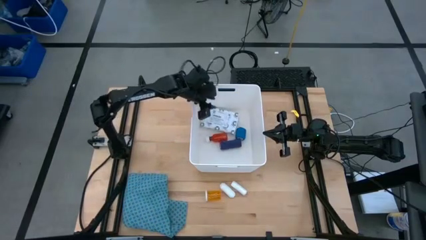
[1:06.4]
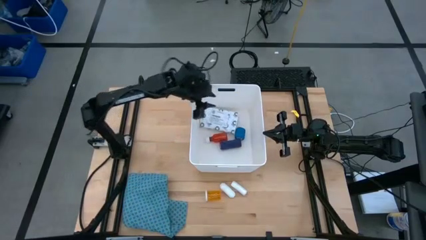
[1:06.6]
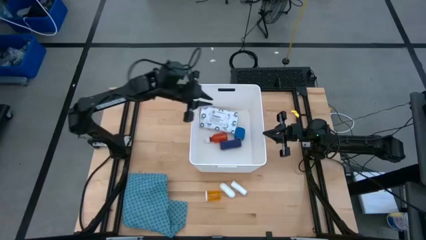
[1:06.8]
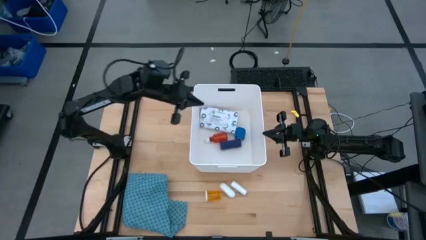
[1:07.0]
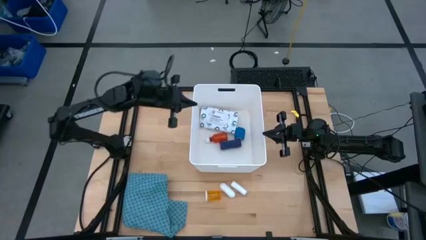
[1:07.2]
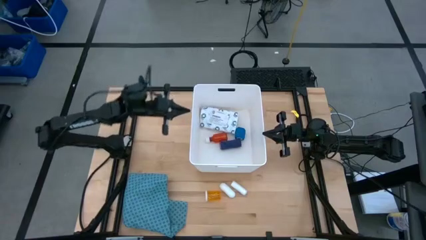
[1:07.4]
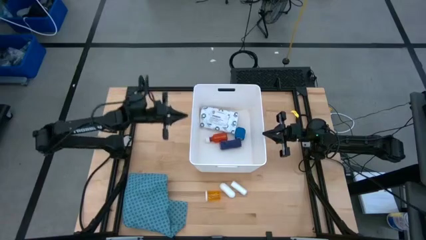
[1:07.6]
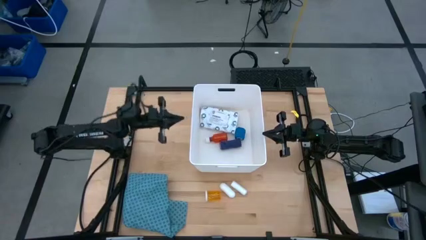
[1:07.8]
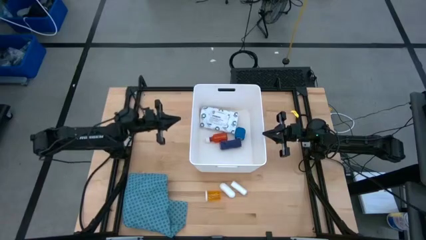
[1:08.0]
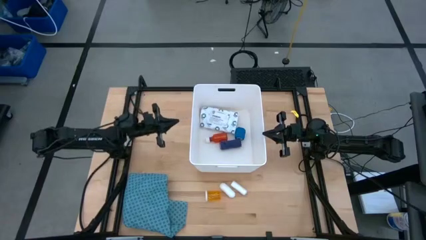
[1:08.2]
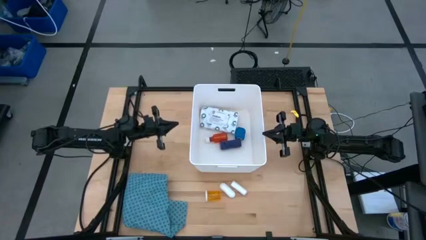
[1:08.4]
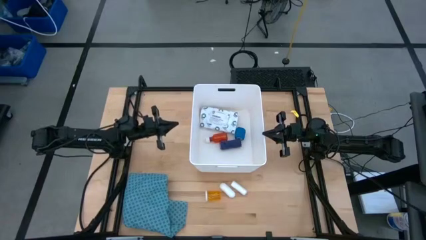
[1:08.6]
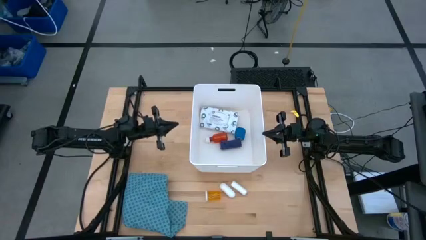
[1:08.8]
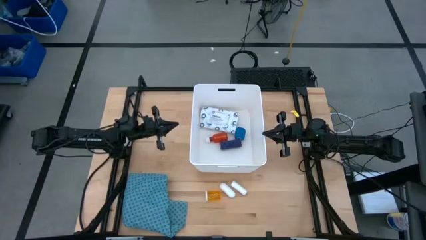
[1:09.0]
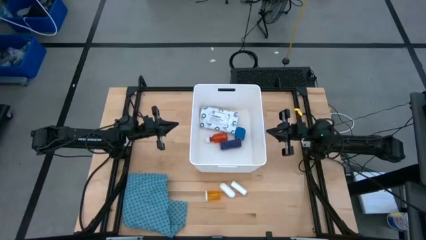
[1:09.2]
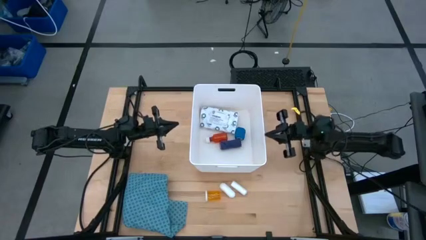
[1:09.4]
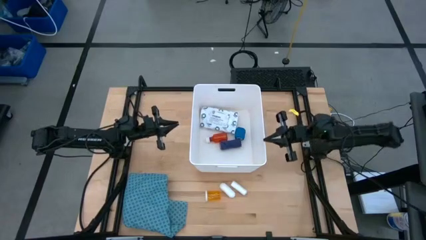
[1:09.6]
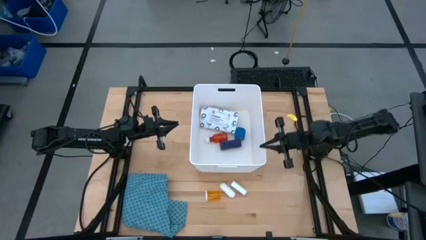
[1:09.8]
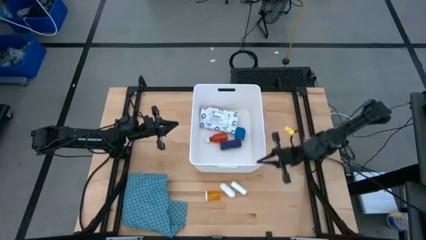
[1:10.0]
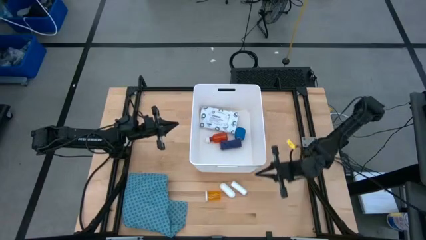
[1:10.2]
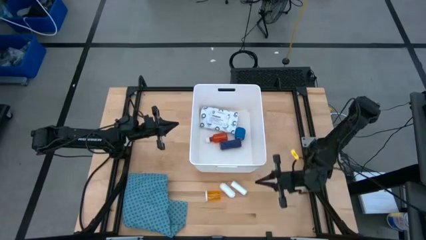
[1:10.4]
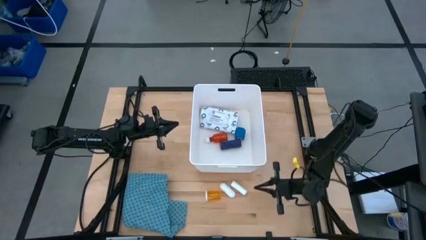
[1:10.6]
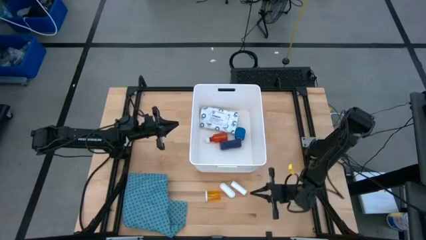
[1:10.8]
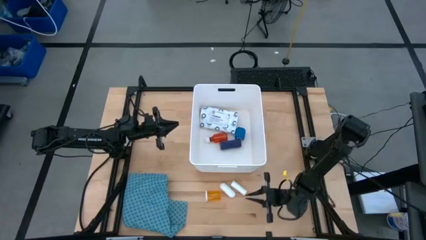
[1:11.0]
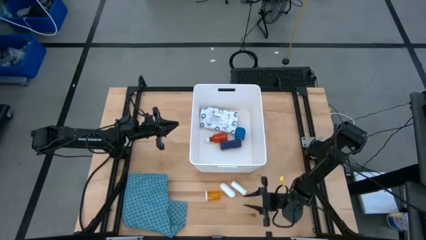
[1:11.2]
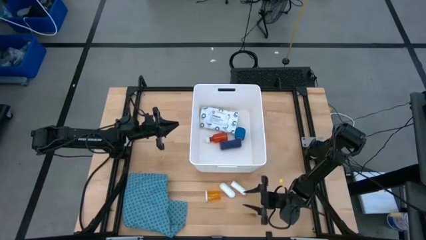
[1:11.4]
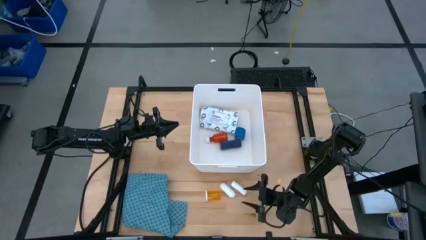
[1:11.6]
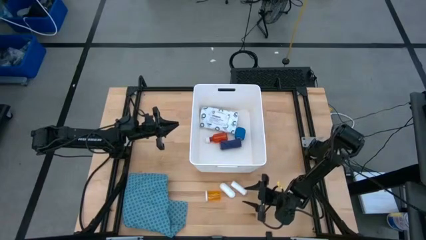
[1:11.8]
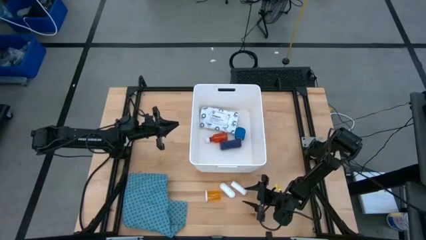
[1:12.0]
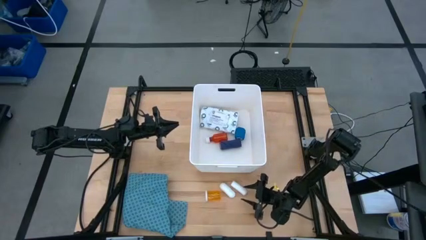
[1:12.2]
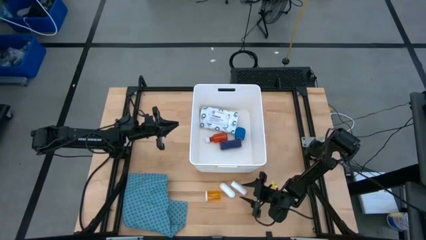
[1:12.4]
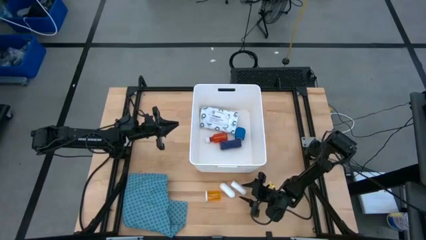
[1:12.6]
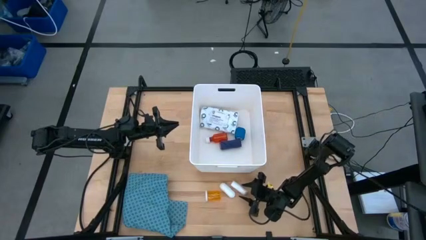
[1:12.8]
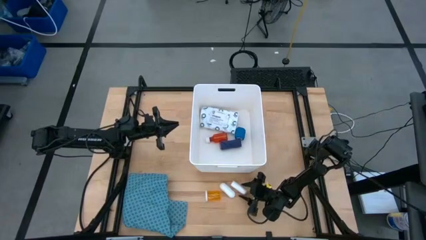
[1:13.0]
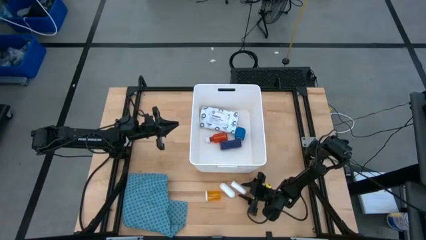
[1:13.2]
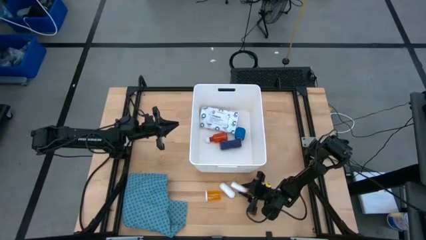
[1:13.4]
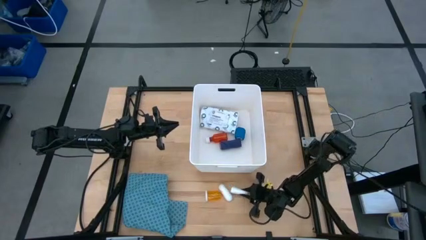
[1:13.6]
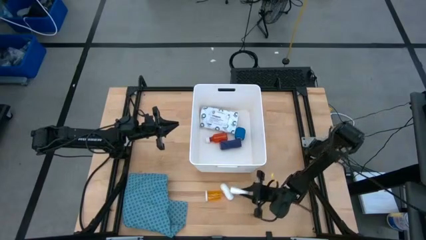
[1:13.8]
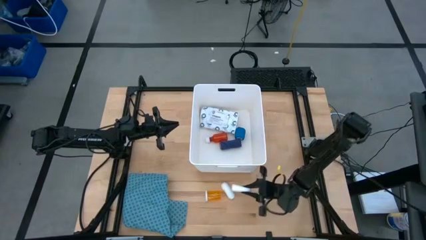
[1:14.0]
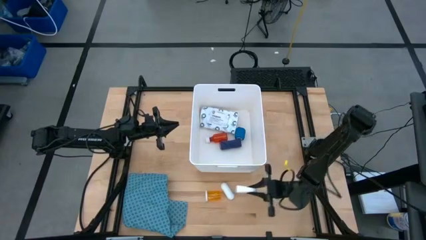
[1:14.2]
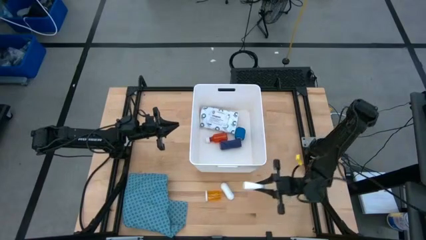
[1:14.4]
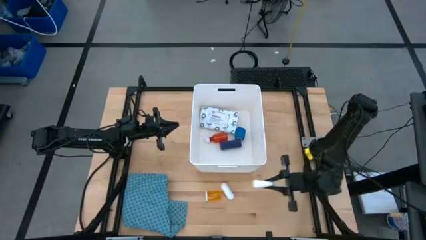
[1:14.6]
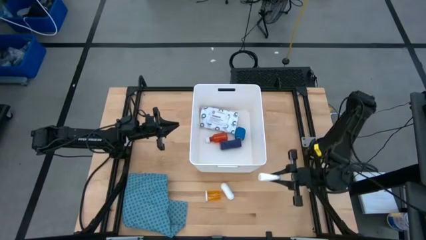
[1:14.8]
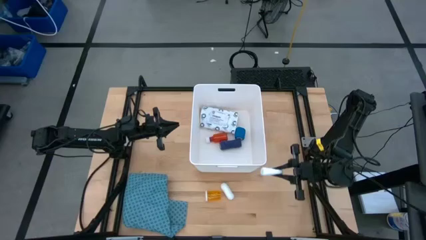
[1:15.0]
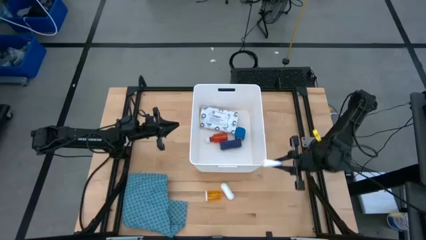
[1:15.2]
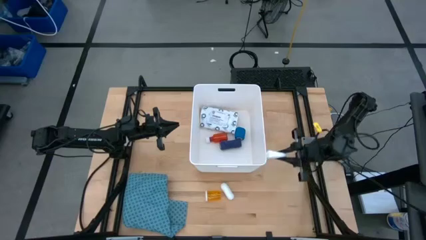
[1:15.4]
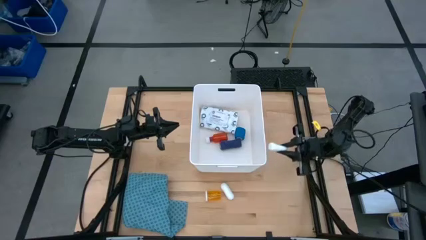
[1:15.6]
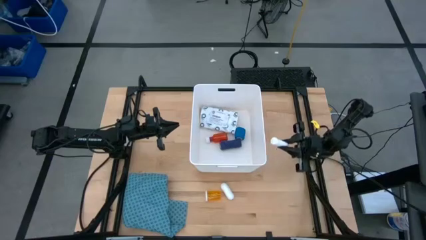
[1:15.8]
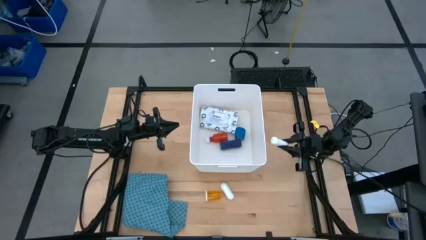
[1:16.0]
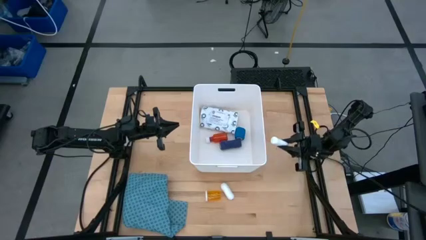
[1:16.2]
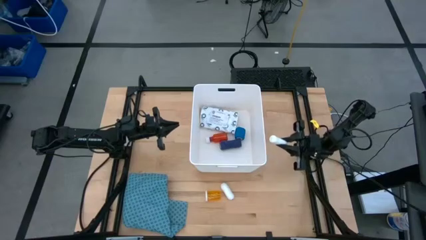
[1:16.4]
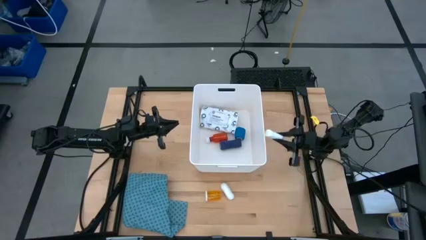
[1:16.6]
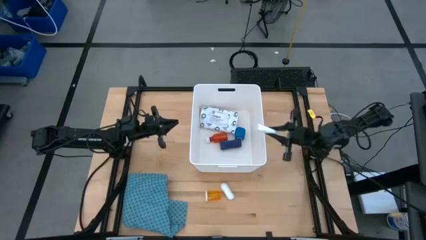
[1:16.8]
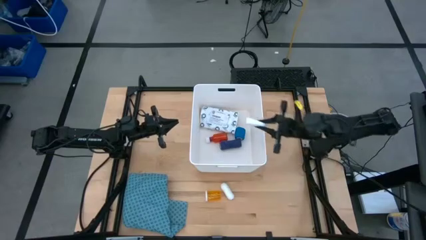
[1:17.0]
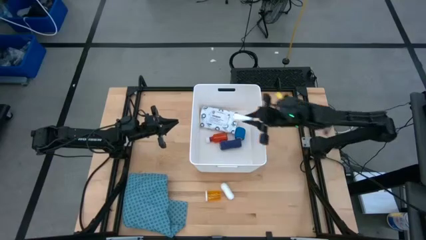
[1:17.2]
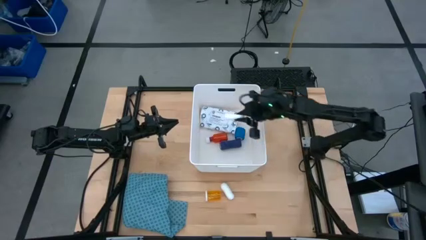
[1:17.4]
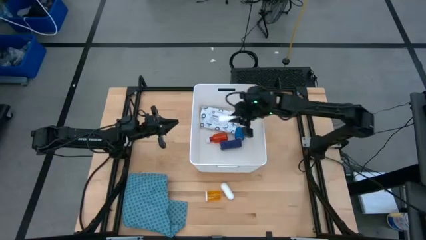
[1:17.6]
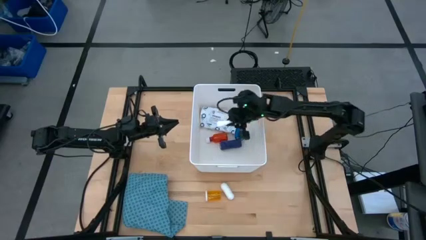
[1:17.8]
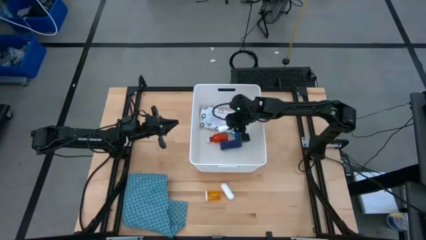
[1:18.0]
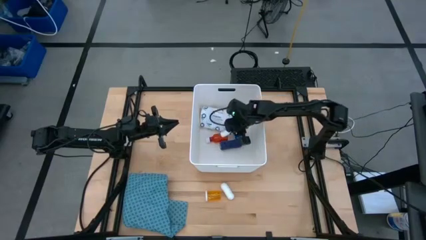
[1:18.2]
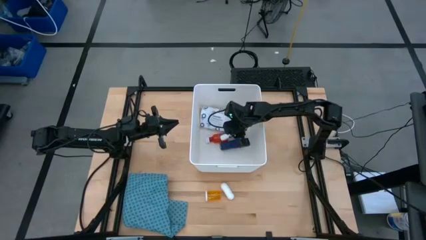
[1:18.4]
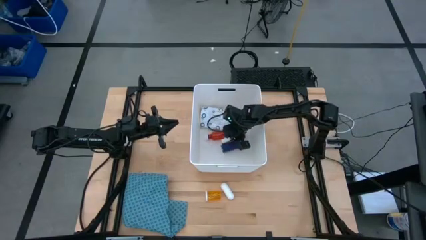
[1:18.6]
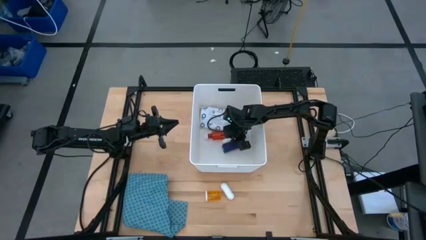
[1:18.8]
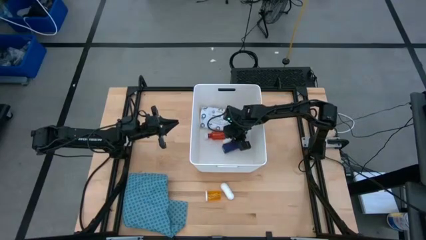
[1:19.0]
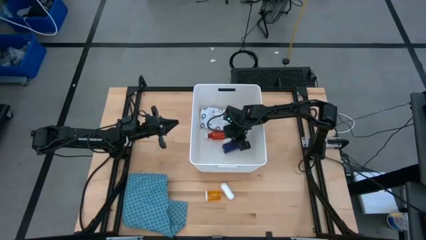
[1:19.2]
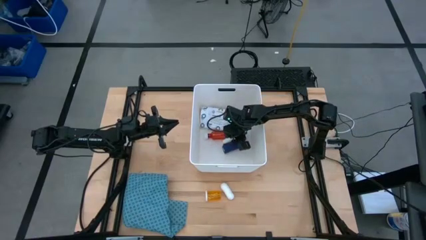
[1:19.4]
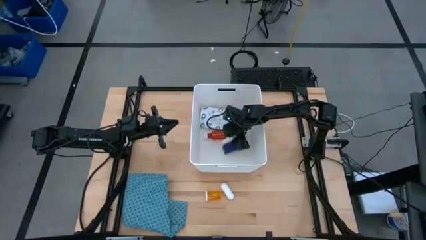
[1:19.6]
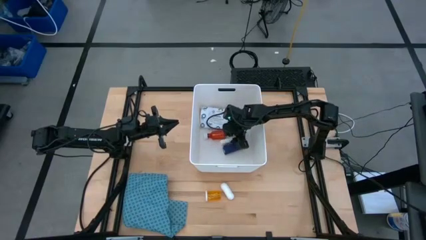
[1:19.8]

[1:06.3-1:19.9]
Task: Pick & place medical supplies in basket/bin
Put the left white rolled gauze into the white bin

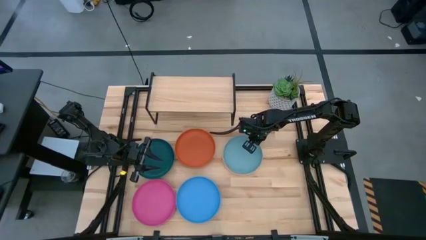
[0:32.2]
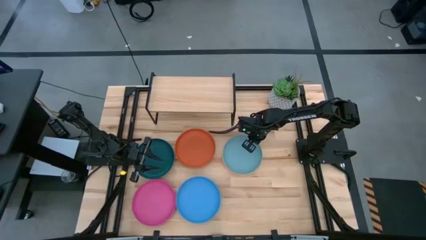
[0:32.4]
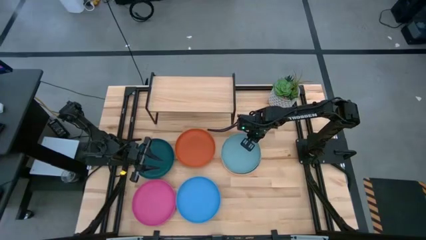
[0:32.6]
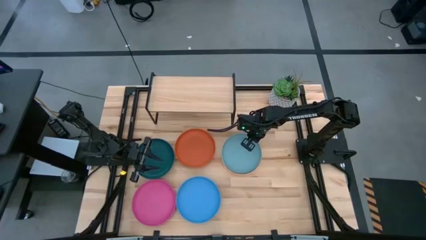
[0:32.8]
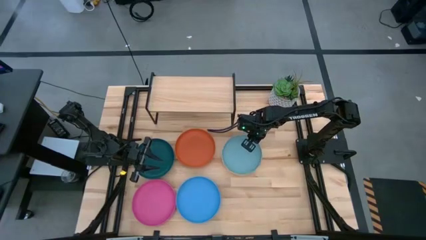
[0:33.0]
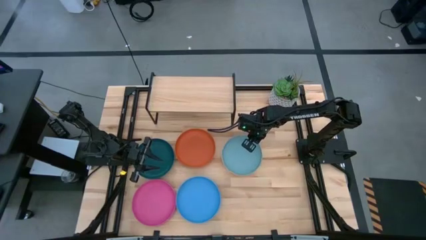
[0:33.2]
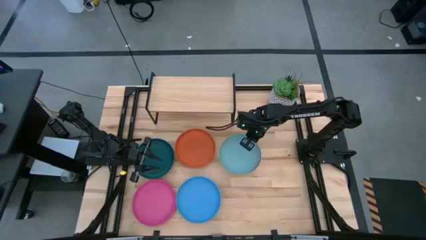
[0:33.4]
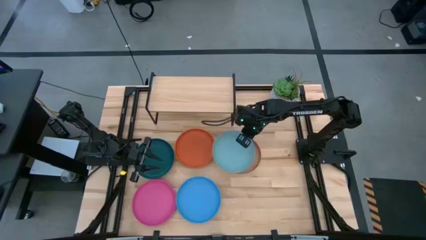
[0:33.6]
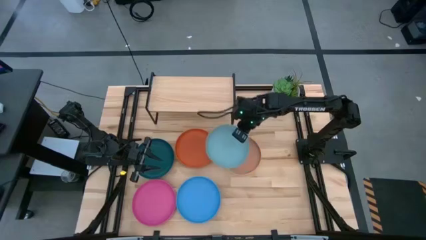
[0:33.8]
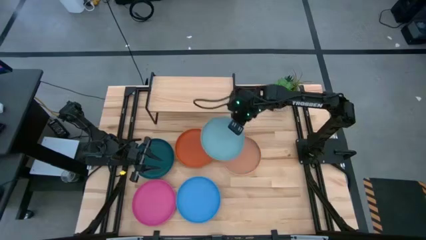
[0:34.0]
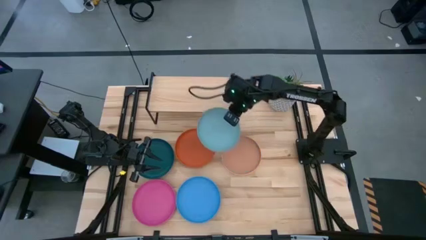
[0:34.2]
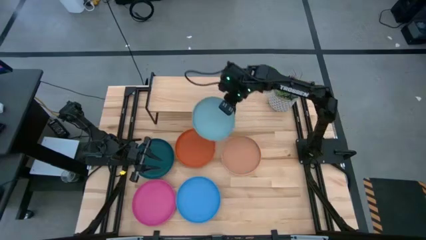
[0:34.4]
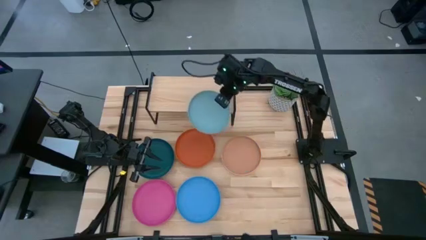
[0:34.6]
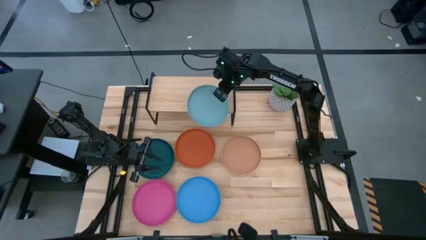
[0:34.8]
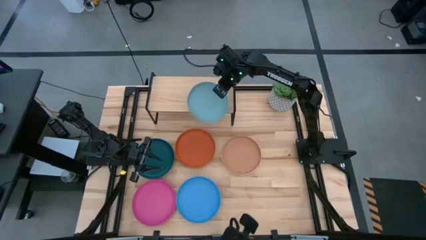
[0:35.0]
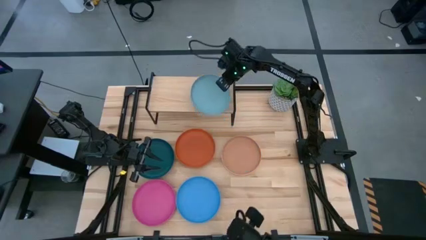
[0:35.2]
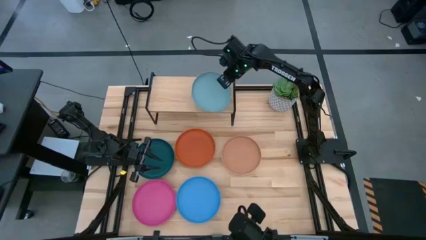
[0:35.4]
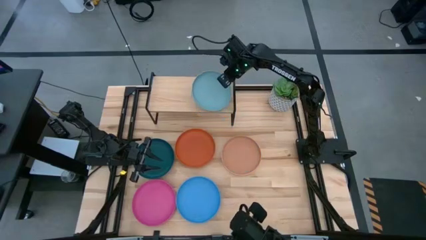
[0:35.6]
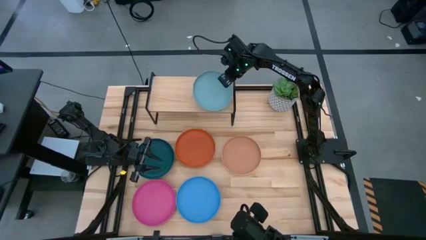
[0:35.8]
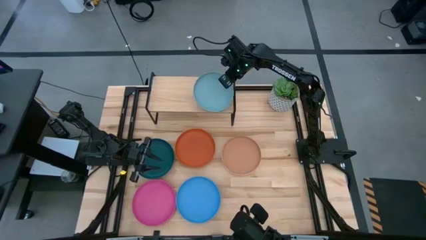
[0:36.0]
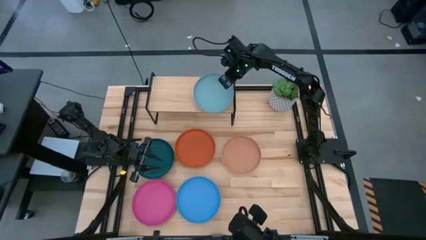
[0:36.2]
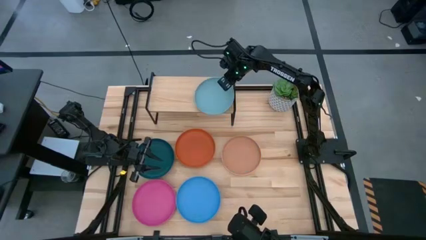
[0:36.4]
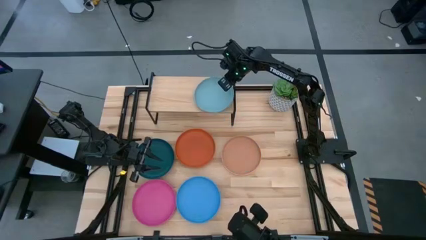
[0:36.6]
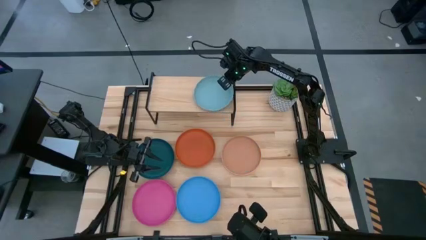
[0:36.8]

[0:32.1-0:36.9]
Task: Place and stack plates onto a shelf
Put the light blue plate on the shelf
